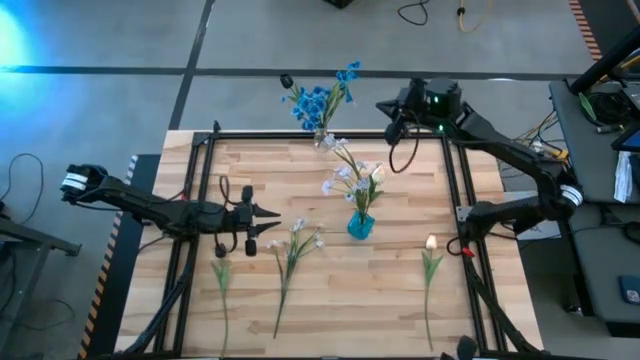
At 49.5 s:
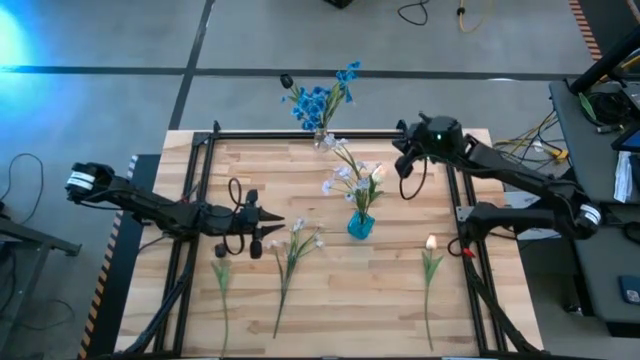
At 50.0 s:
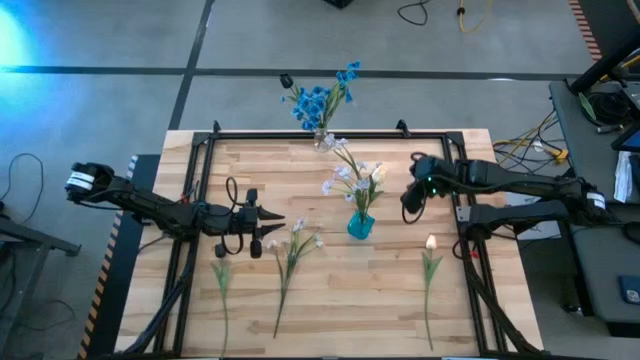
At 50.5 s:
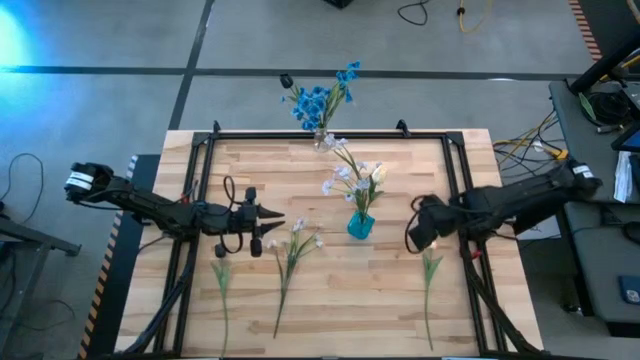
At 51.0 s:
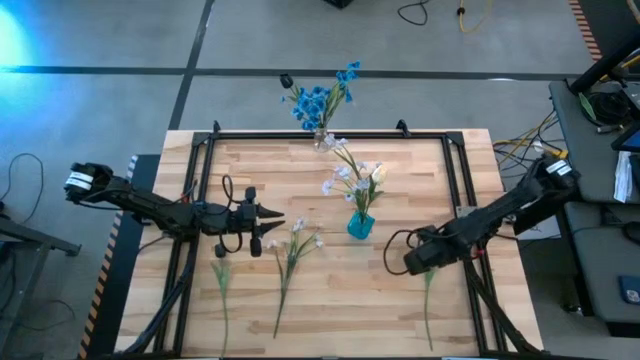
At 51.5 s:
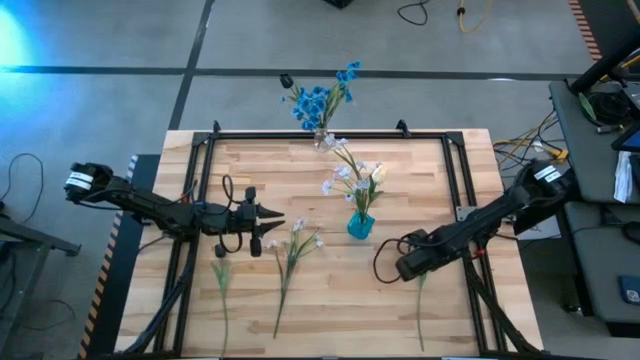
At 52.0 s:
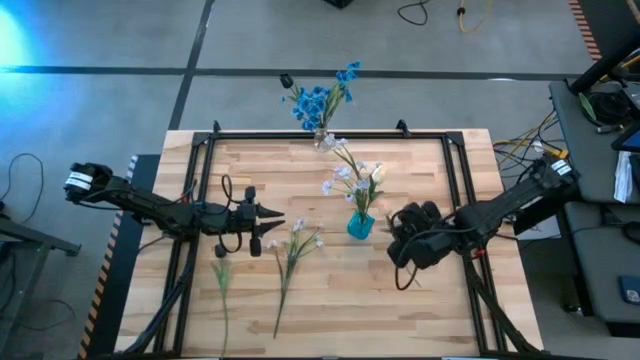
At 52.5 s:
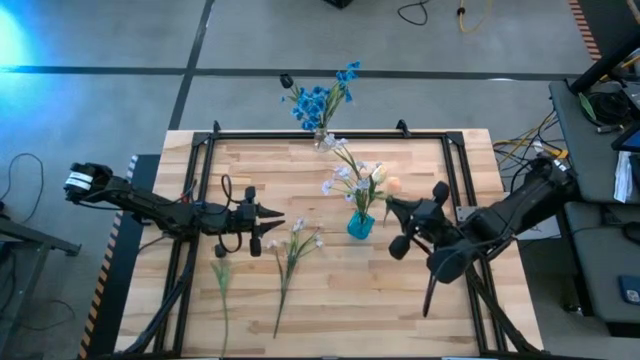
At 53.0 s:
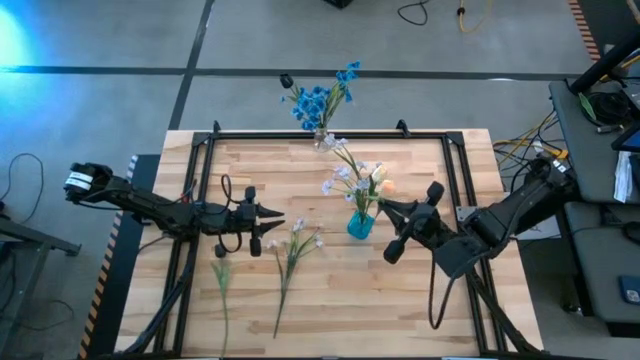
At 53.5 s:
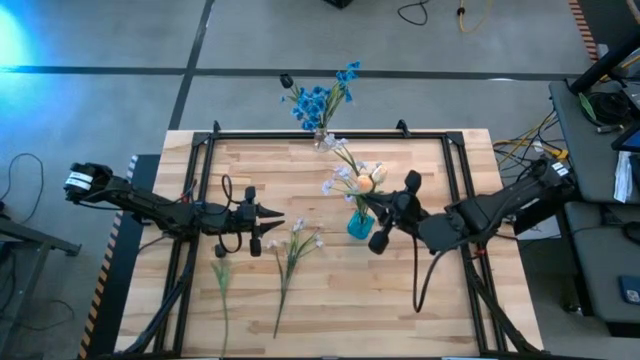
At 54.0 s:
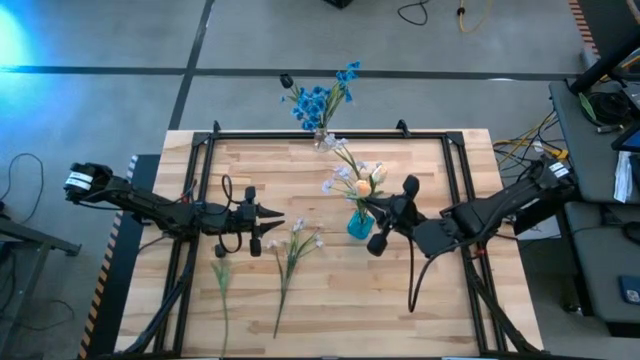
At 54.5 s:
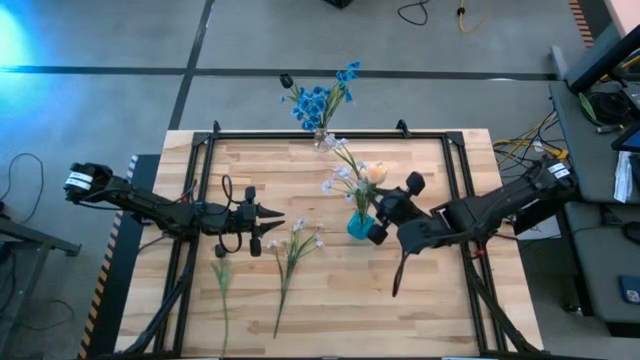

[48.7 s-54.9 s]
Task: Sort flowers into vase by color
Put the white tulip into the blue vase

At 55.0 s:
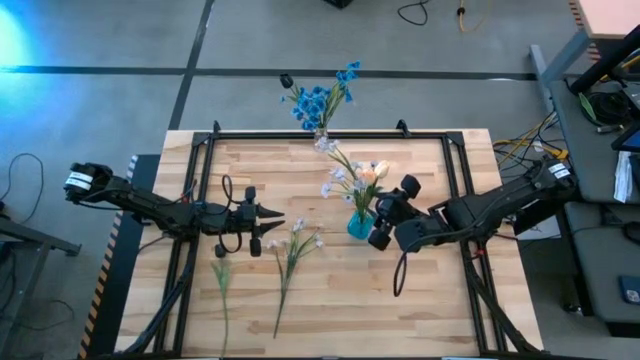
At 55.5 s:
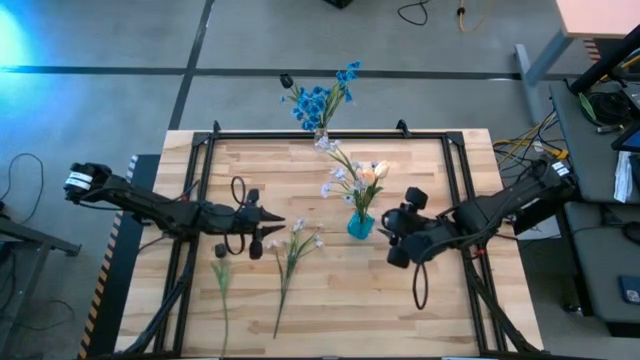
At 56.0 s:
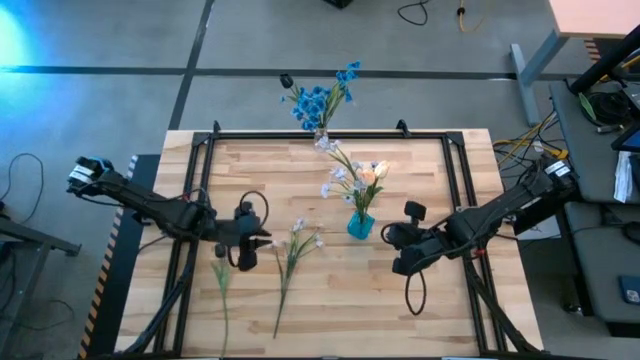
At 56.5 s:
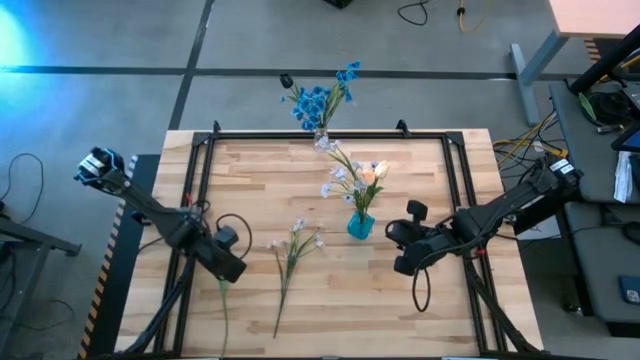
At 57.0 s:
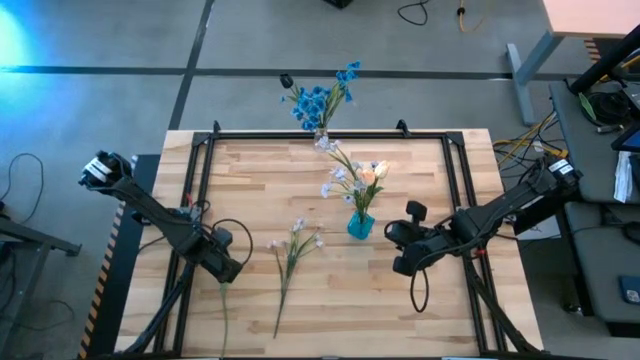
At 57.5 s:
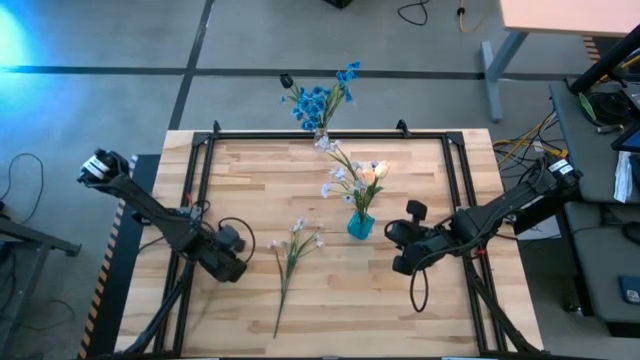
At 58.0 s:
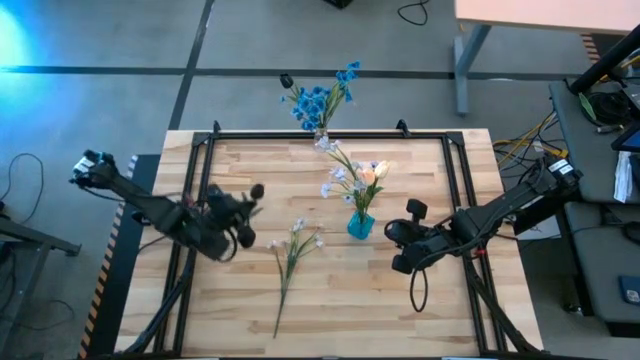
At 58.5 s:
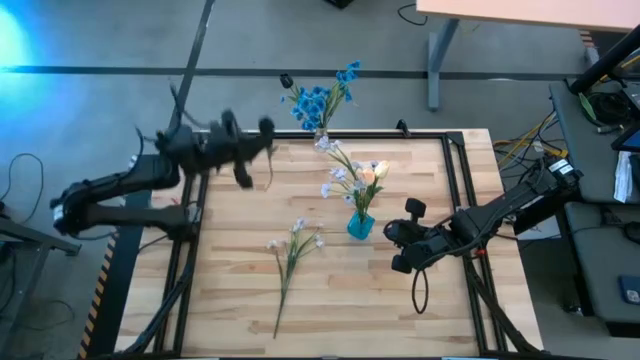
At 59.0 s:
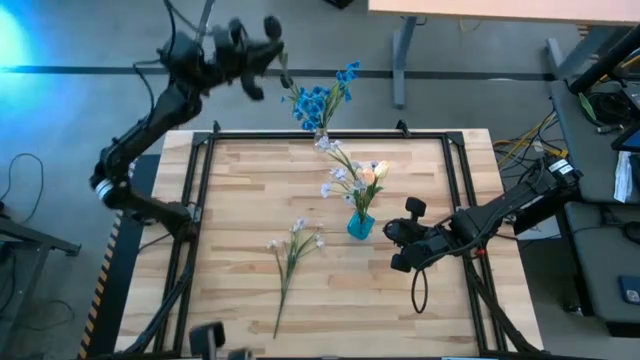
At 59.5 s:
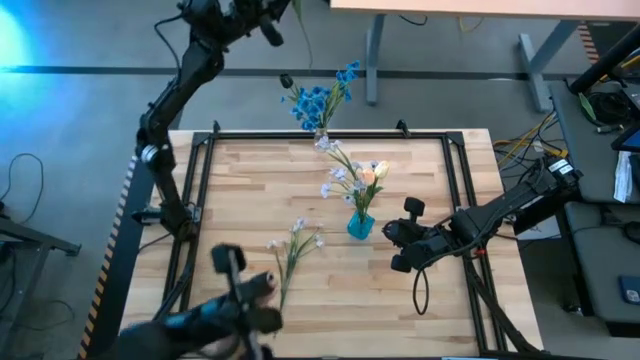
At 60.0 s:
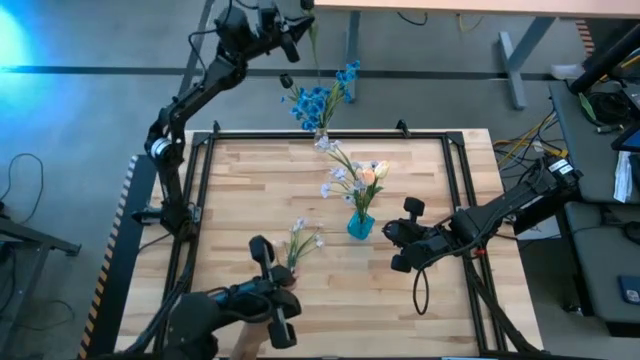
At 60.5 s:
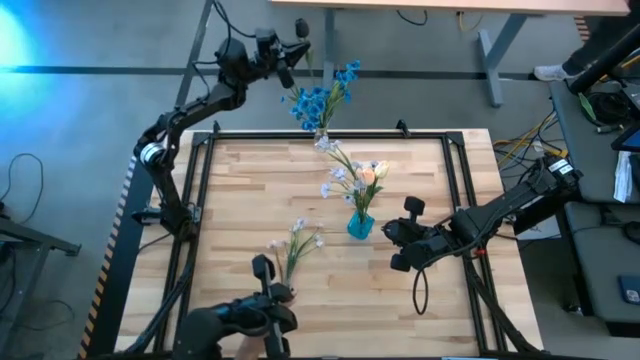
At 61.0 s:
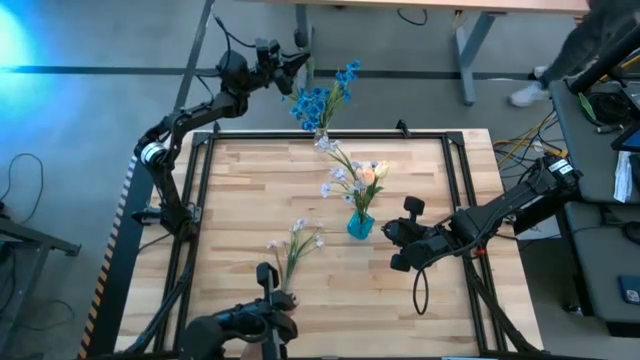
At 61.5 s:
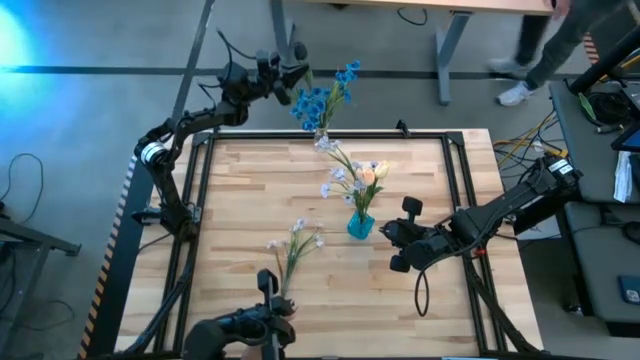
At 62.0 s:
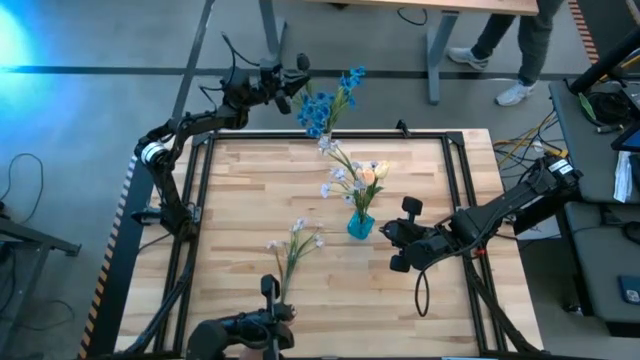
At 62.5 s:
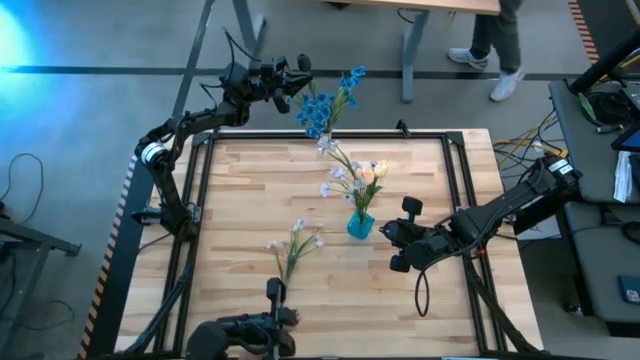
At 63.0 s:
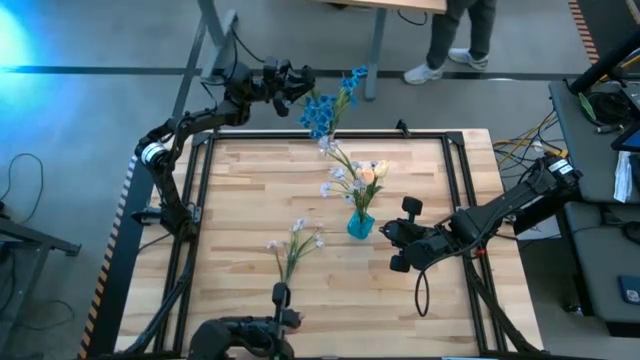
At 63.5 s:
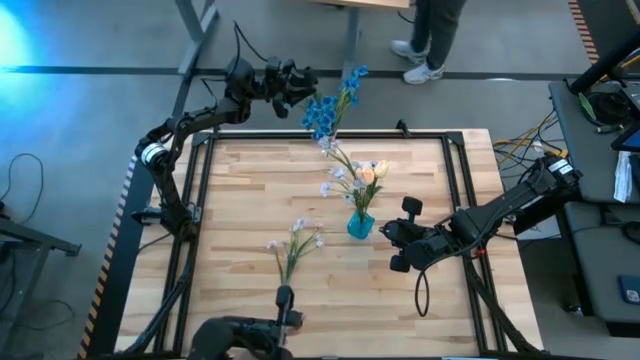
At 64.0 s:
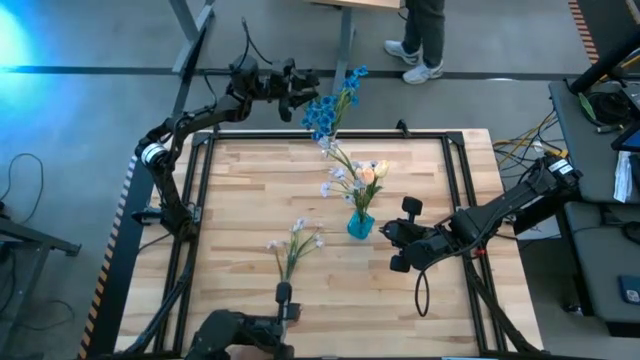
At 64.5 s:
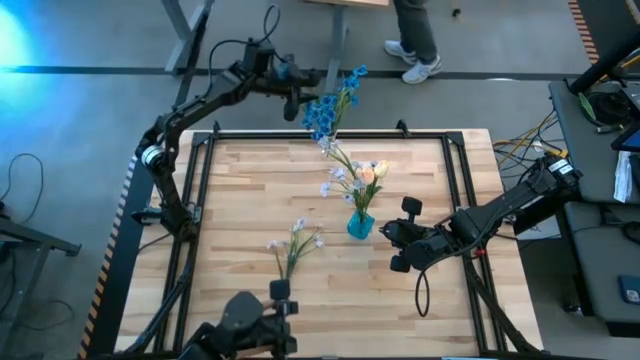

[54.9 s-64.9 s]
Put black tulip into the transparent vase

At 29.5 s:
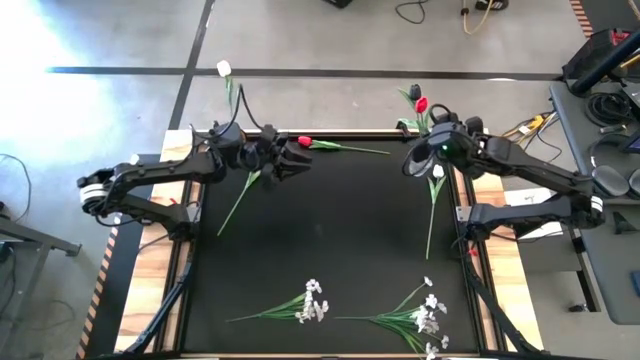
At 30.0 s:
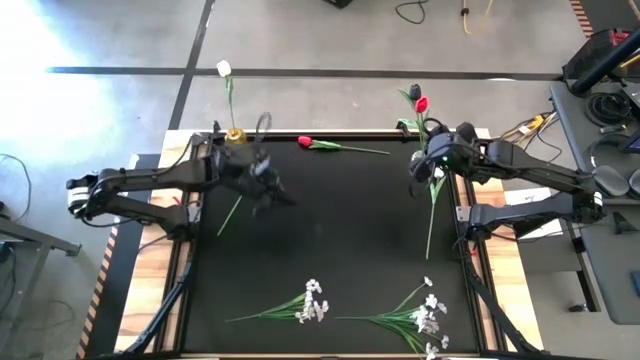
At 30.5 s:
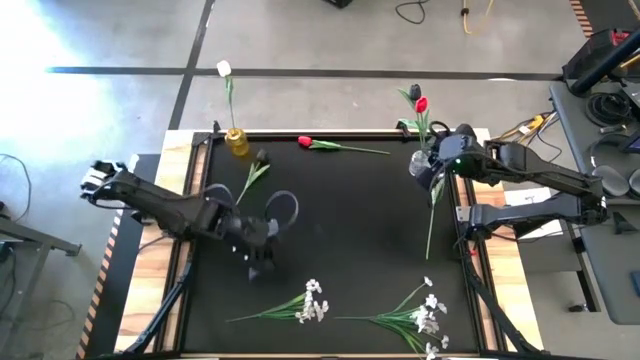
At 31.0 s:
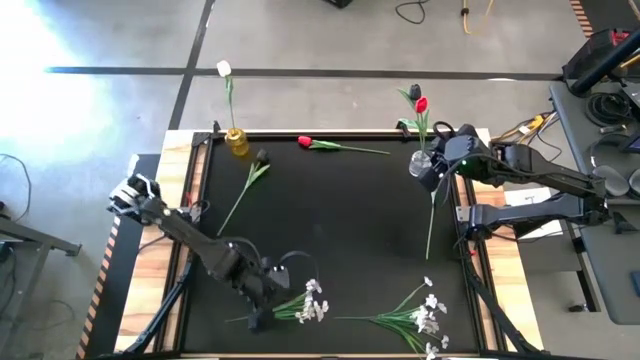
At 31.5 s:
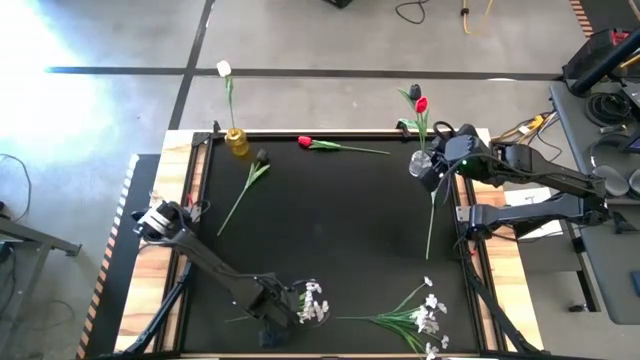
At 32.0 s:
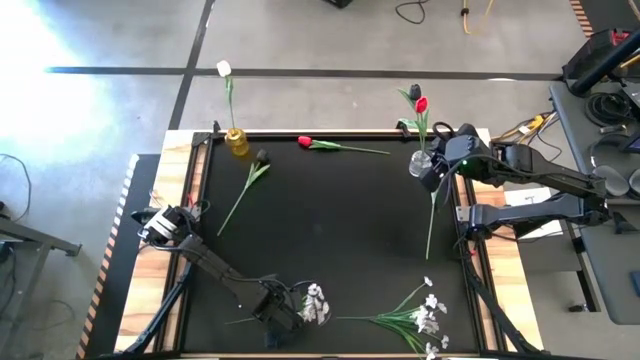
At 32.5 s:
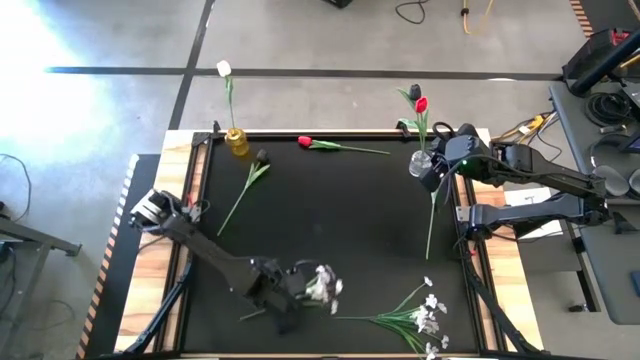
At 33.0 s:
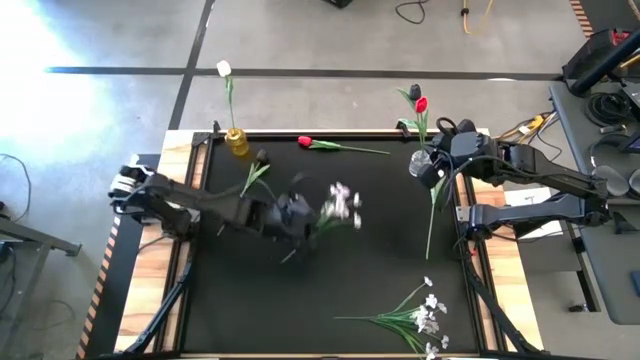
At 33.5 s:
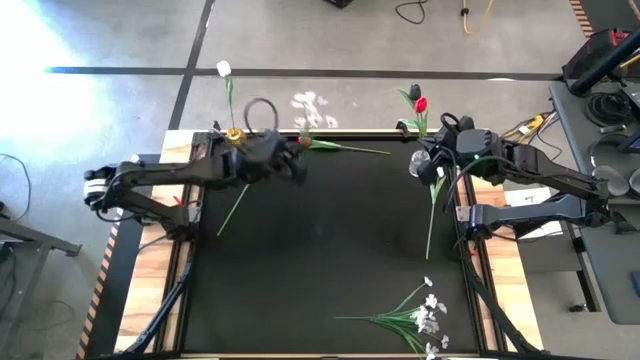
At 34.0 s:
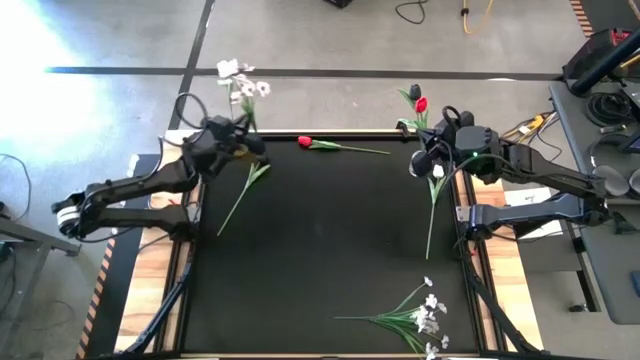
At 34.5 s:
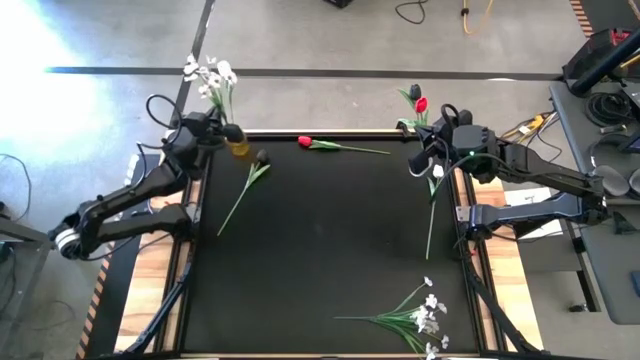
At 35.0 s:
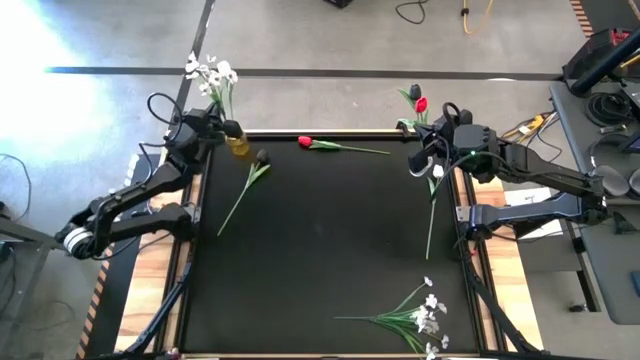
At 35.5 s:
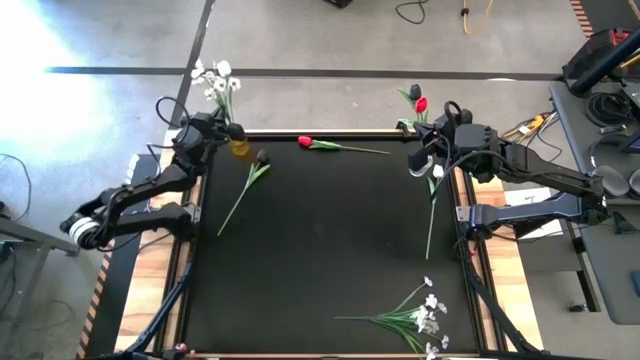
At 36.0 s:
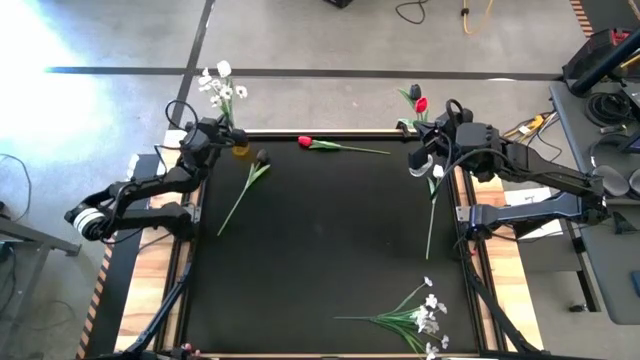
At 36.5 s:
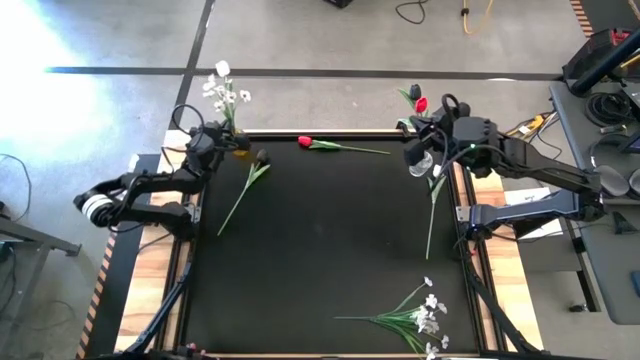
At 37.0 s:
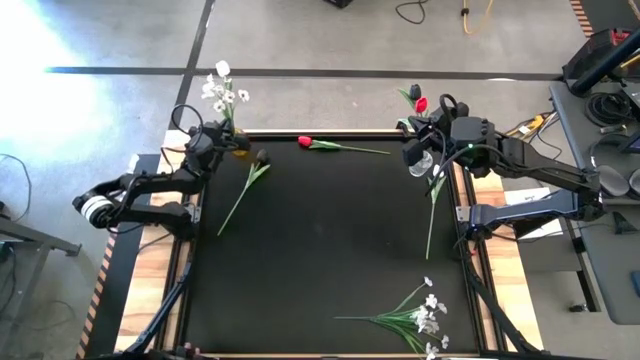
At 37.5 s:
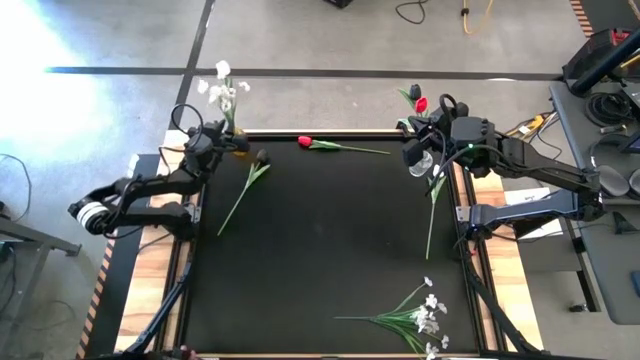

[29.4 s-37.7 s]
Task: Sort flowers into vase by color
Put the left white flower into the yellow vase
